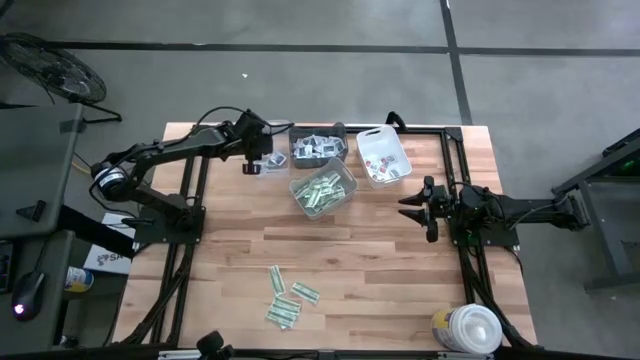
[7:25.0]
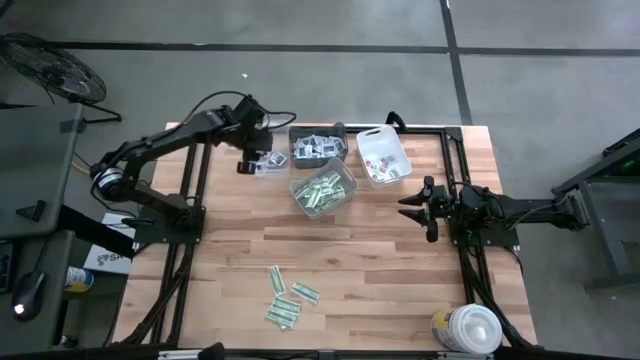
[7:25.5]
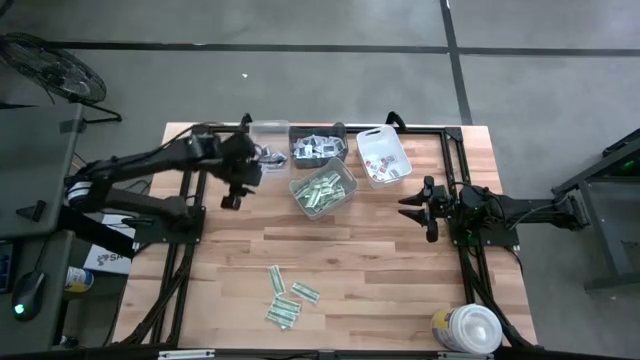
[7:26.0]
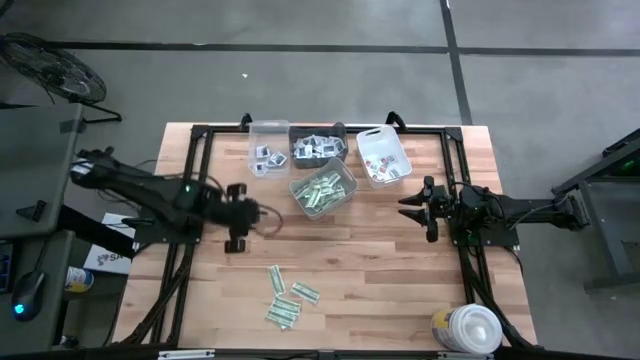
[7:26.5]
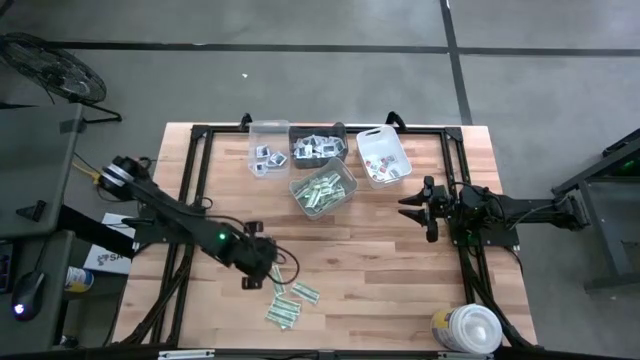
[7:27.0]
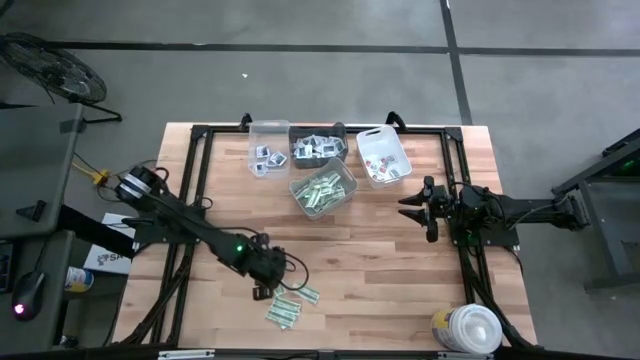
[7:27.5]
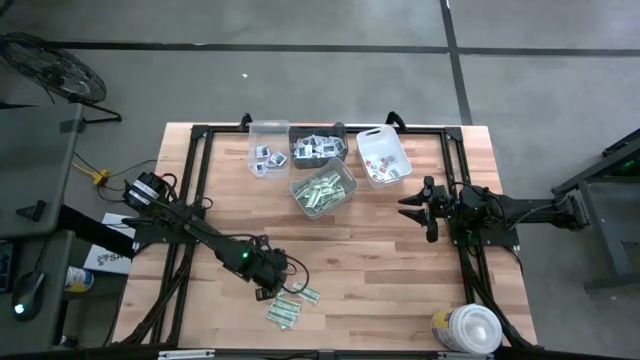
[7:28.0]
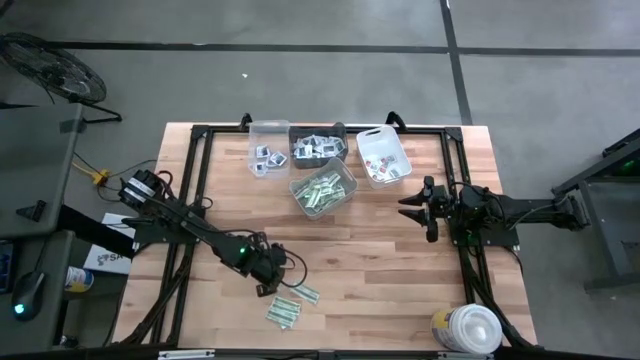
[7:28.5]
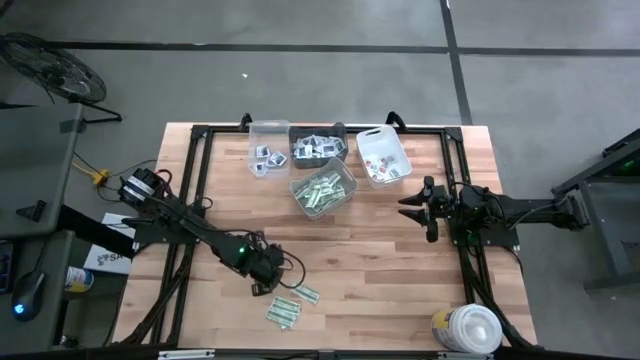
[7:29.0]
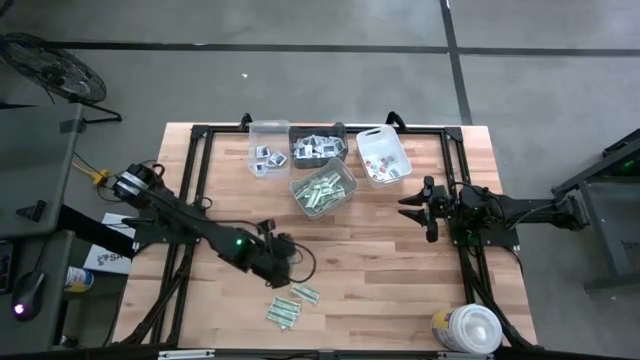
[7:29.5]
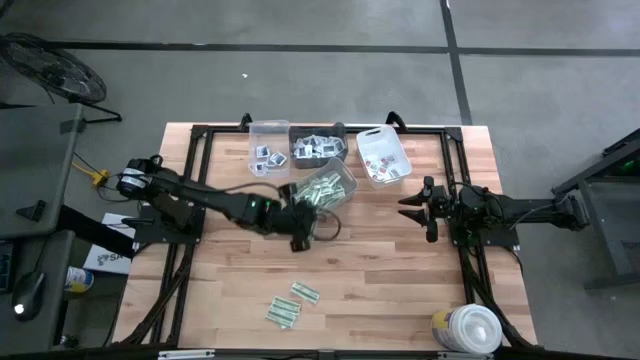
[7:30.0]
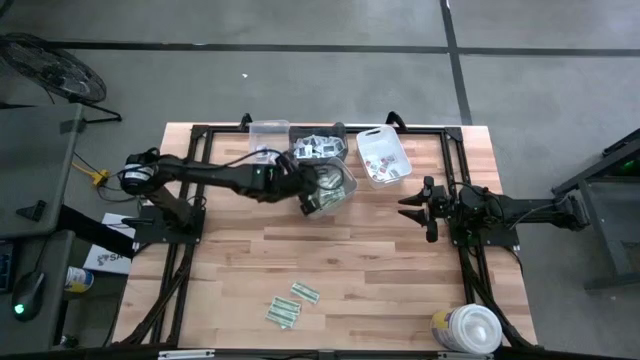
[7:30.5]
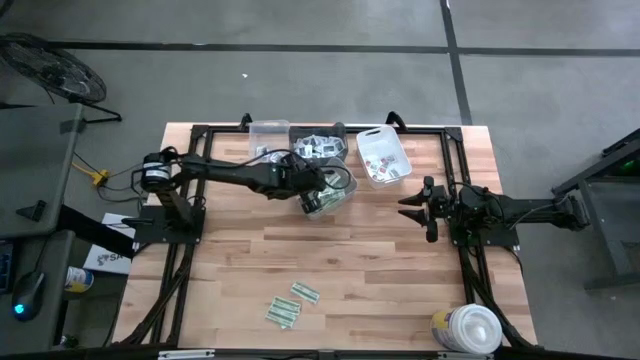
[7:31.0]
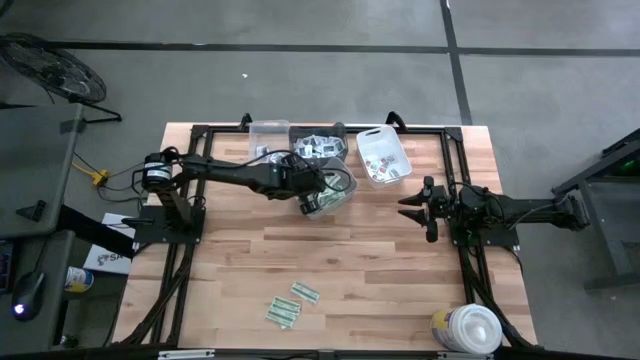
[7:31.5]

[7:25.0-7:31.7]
Task: Pick & Place First Aid Supplies
Put the bandage pack into the gray bin

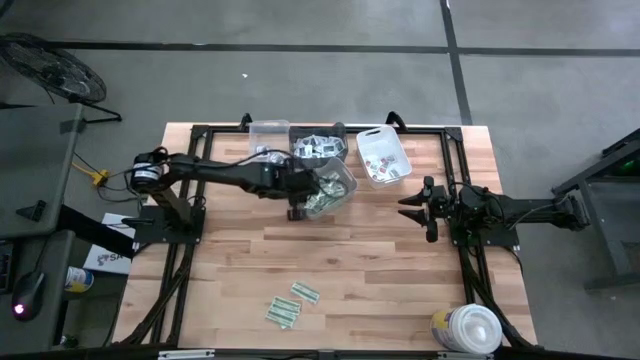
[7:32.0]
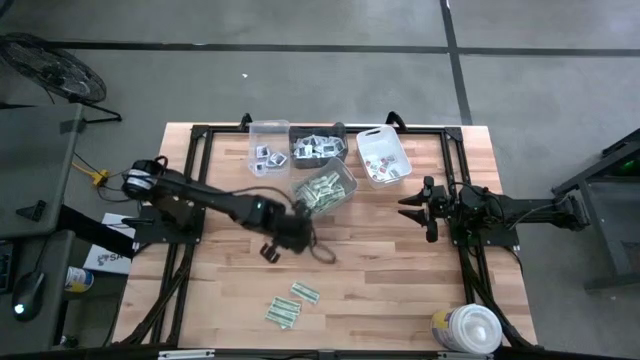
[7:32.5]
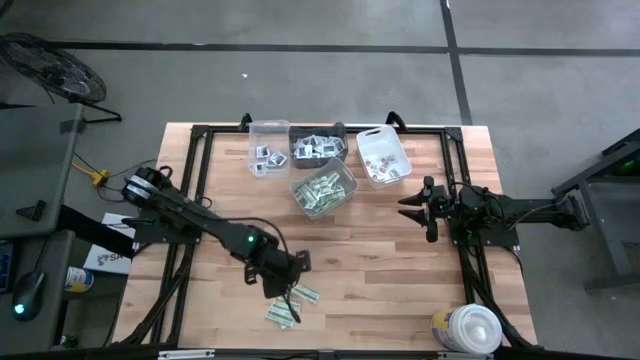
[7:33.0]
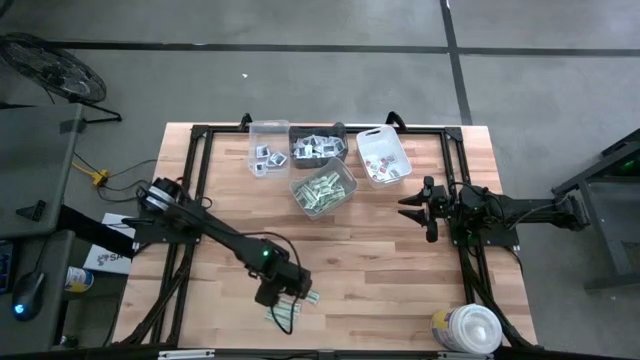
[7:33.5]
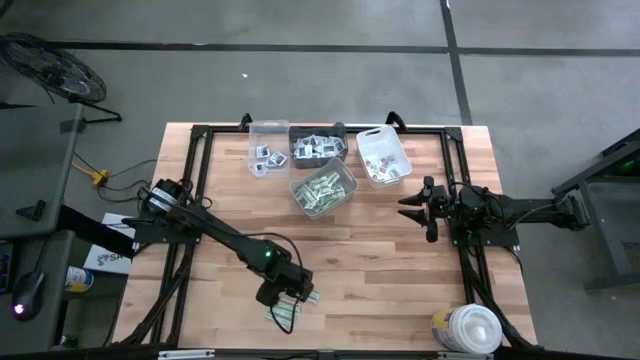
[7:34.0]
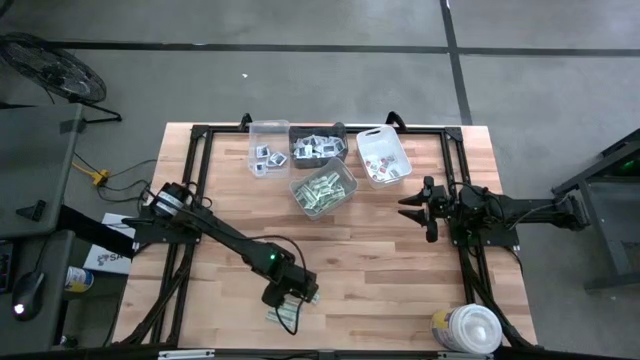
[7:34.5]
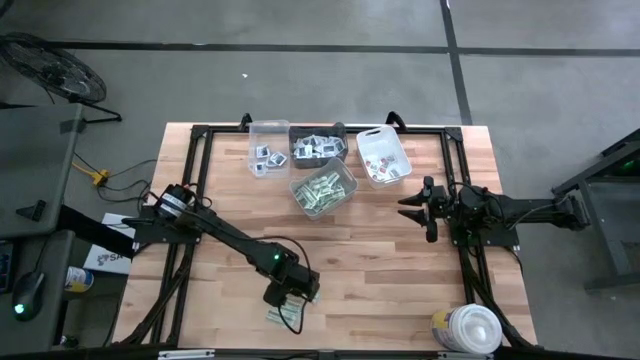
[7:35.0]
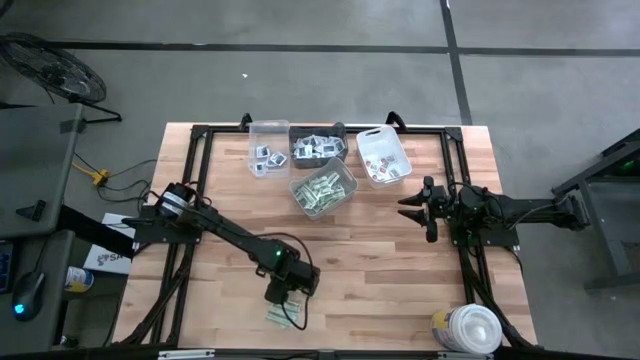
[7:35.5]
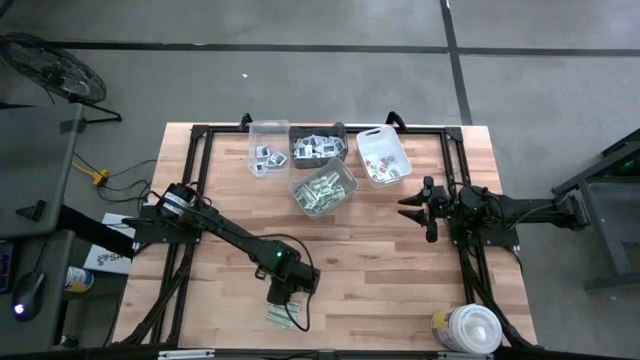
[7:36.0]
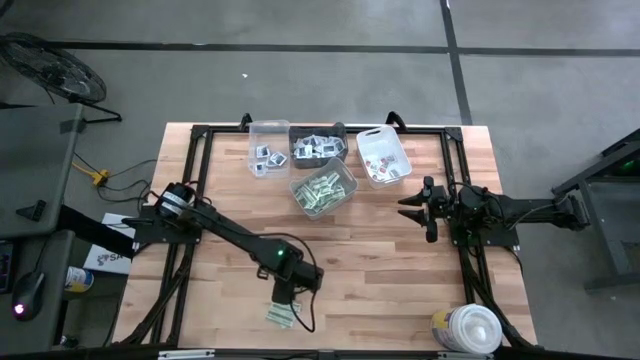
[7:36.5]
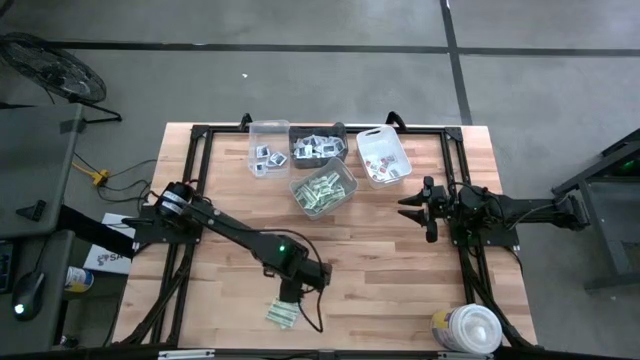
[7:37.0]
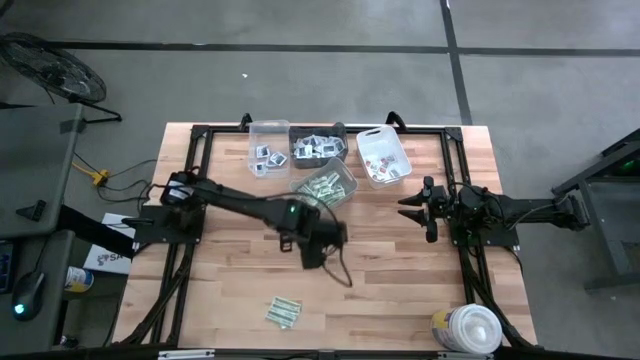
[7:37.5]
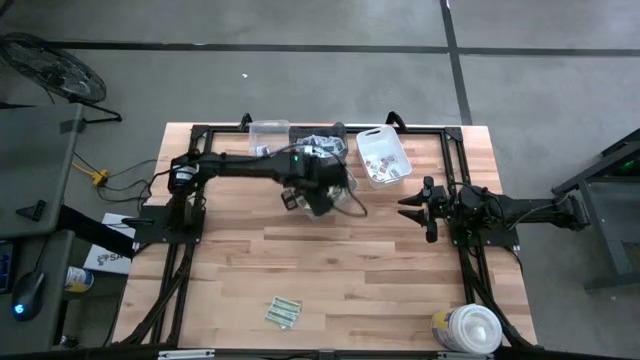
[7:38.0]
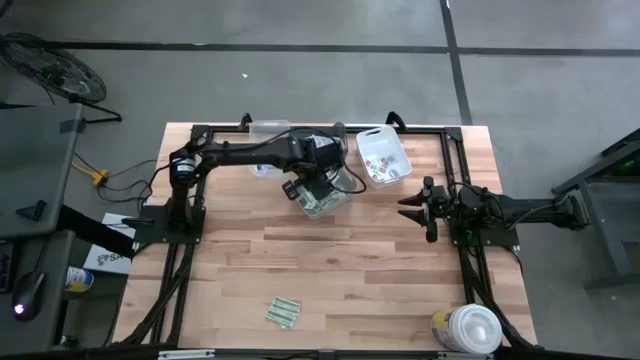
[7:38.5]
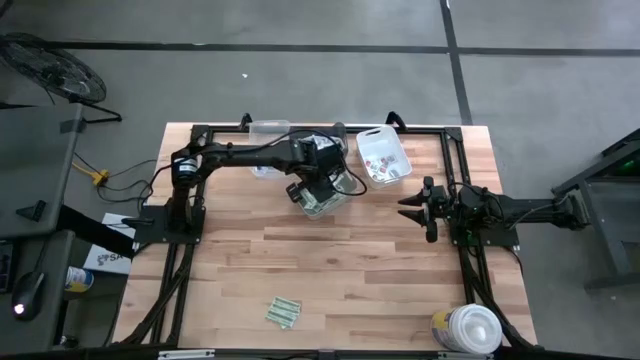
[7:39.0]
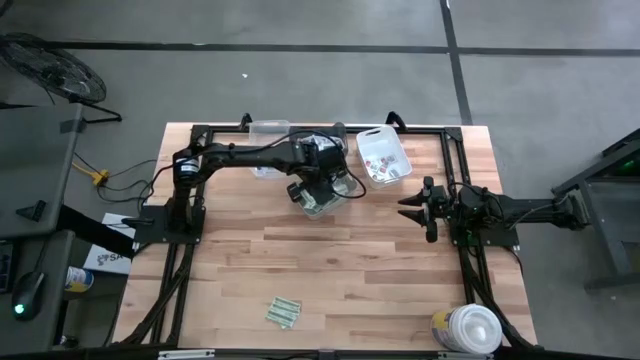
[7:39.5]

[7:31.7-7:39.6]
Put the bandage pack into the gray bin

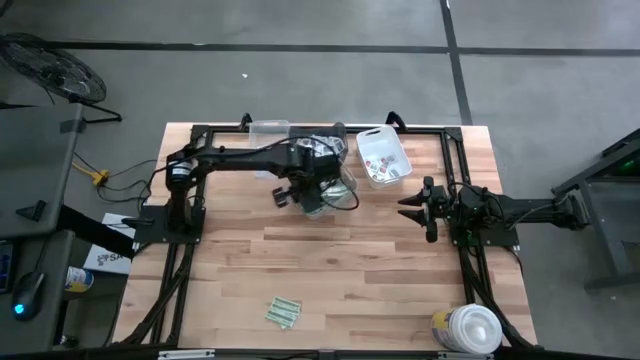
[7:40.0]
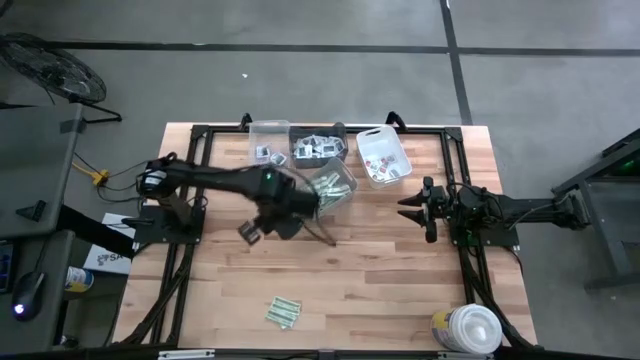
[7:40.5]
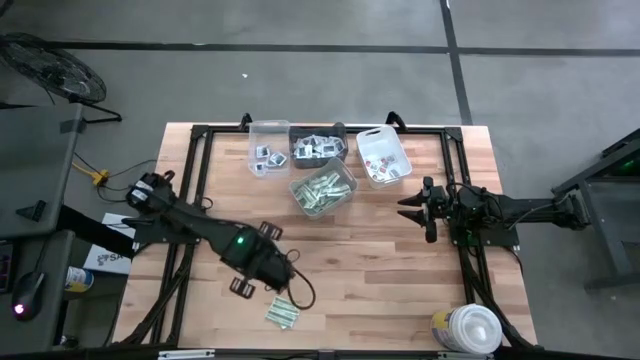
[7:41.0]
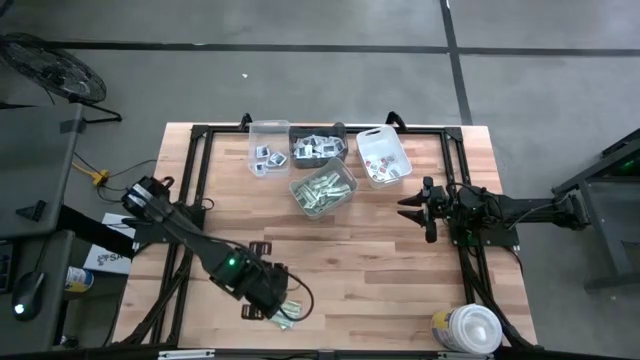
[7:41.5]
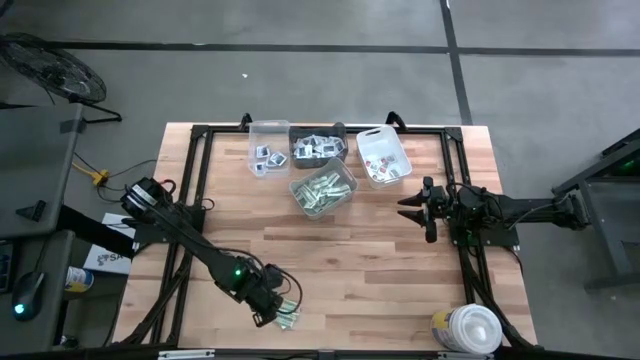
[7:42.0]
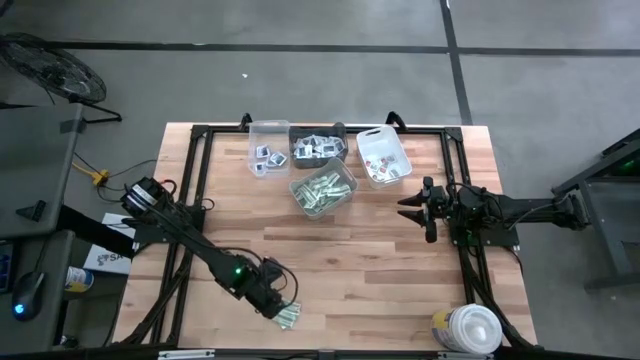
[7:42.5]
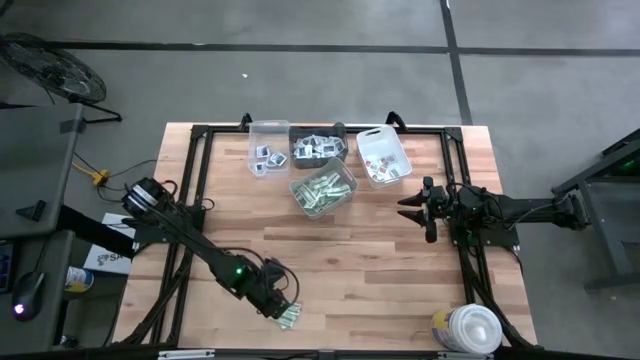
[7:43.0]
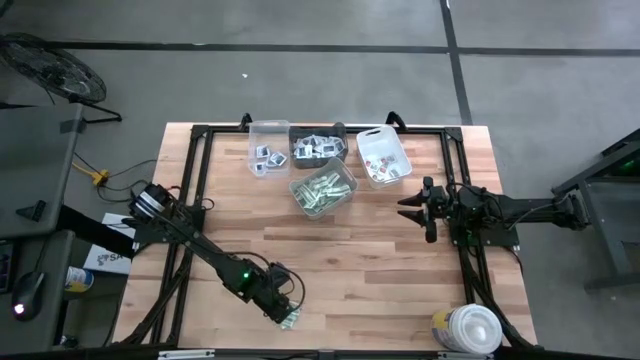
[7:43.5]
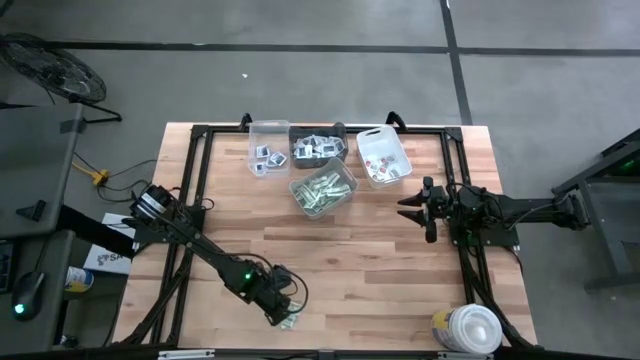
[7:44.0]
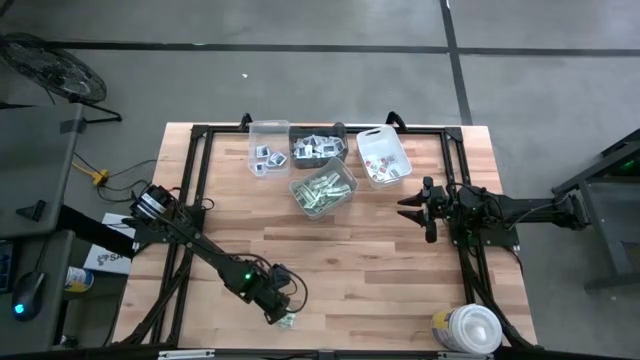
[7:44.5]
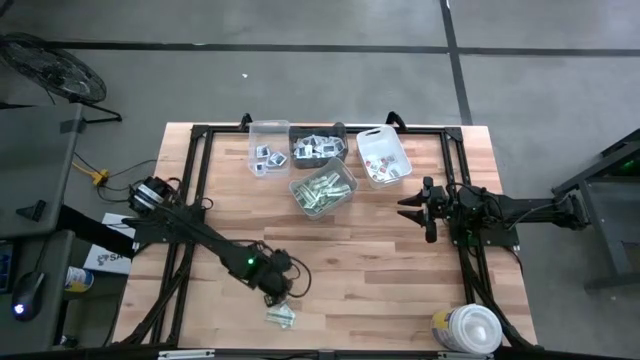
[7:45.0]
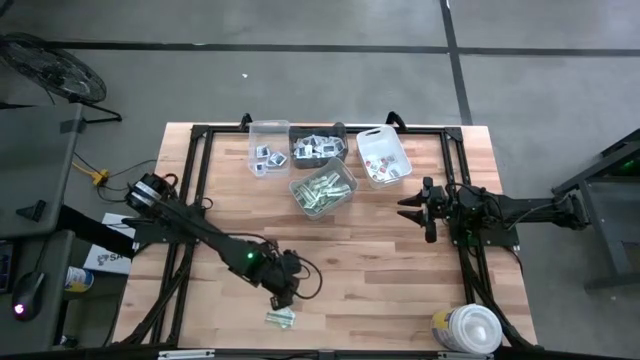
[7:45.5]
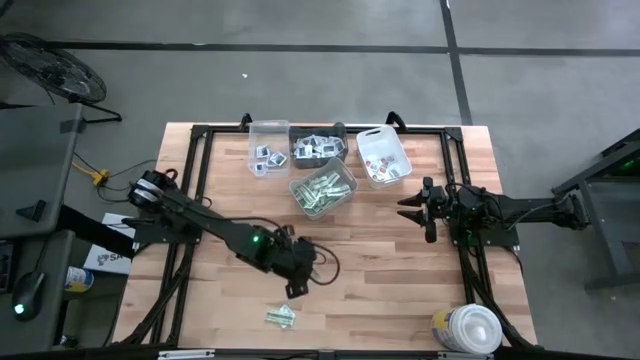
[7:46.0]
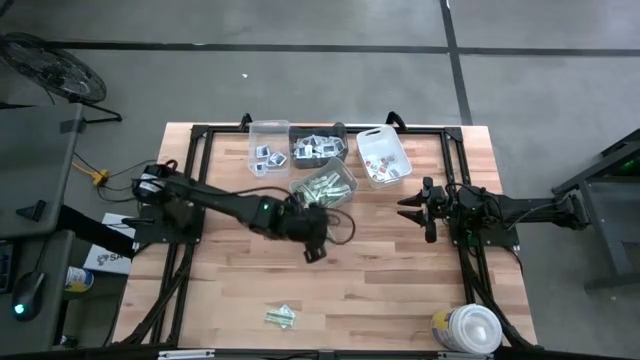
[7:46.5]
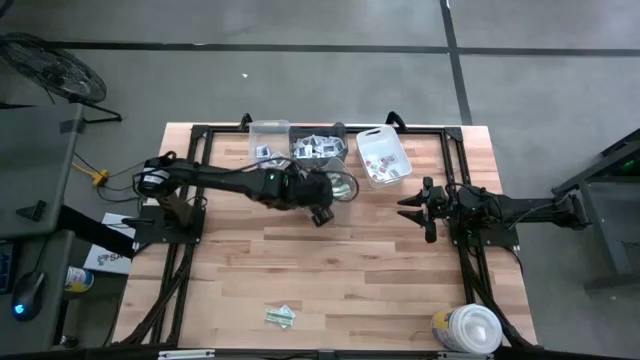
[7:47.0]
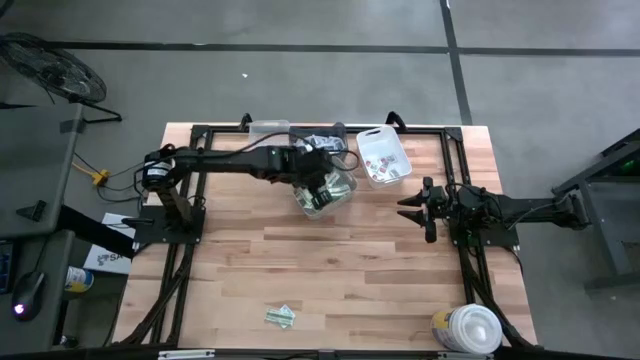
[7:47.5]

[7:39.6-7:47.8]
Put the bandage pack into the gray bin
